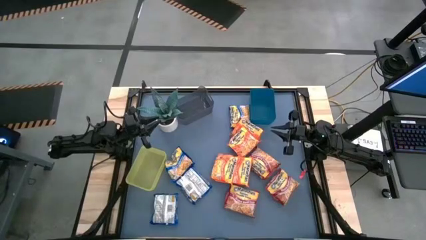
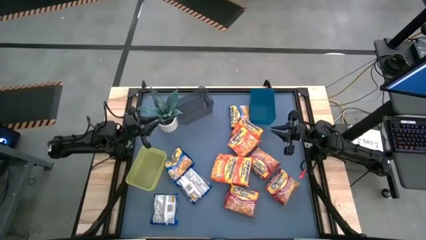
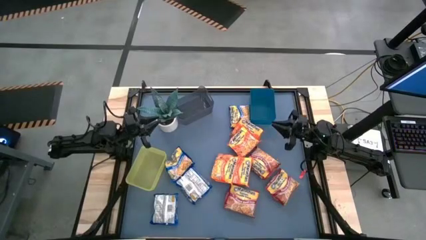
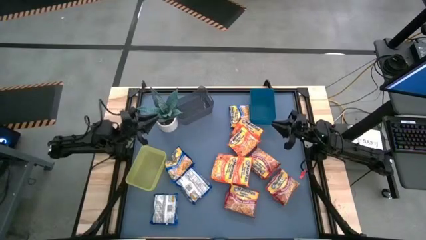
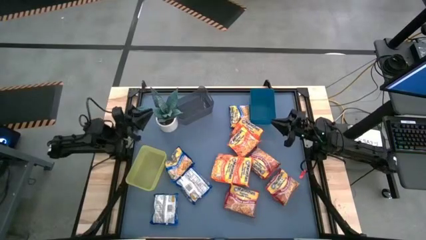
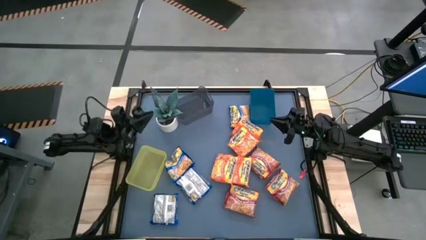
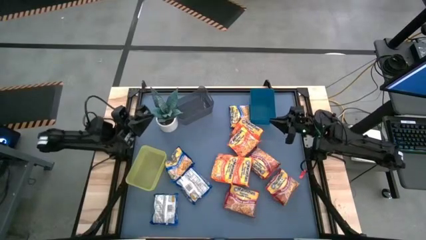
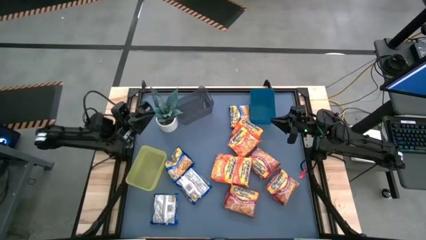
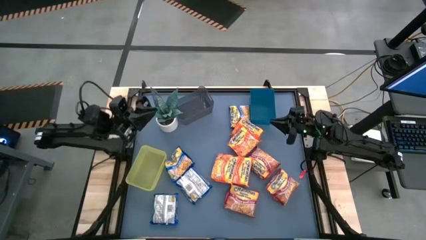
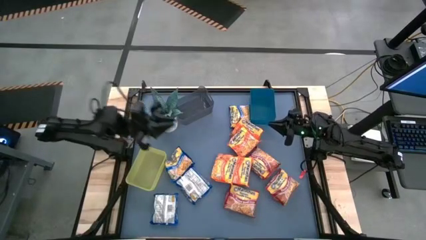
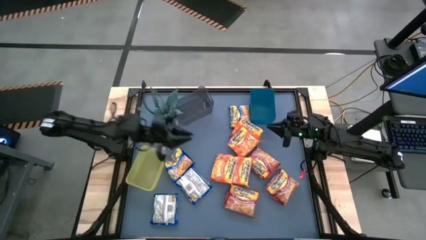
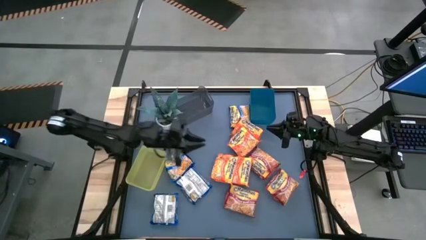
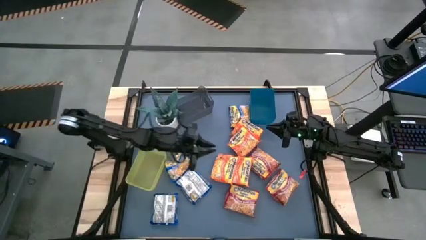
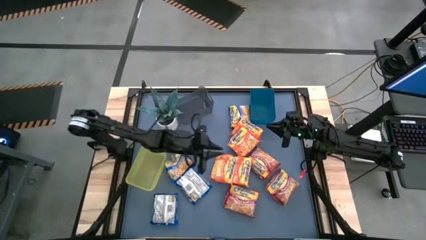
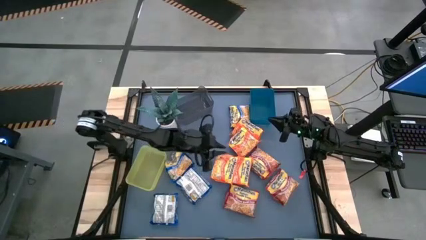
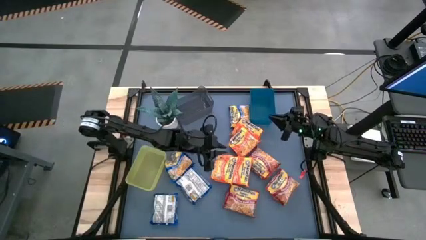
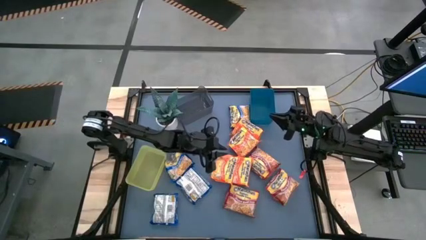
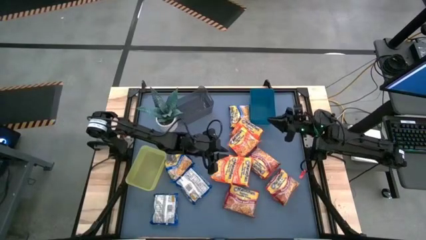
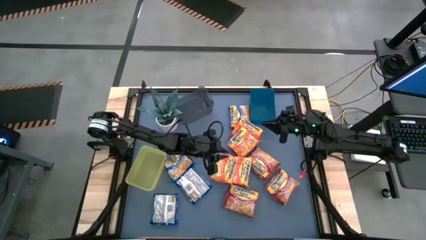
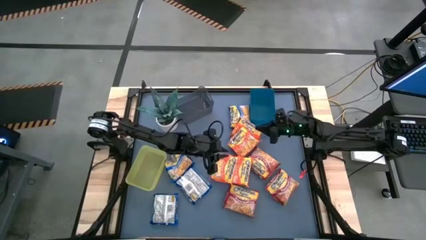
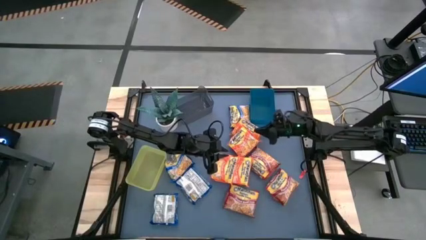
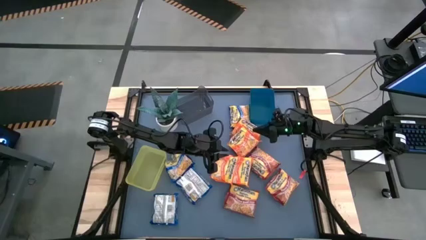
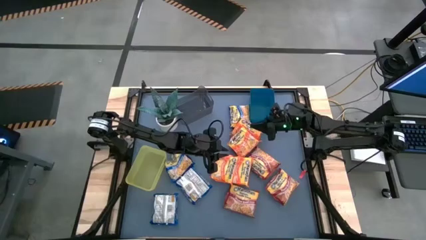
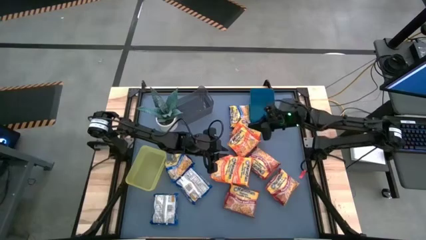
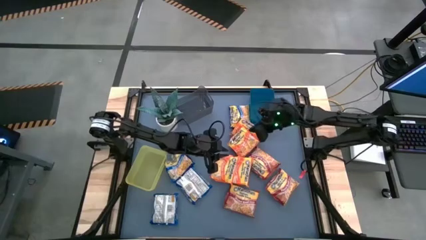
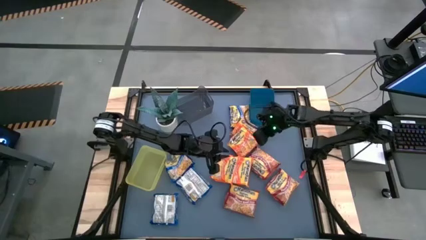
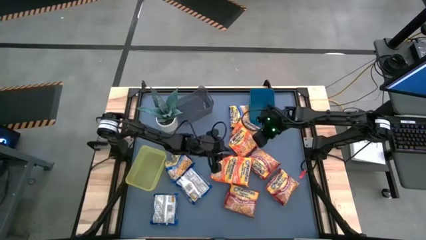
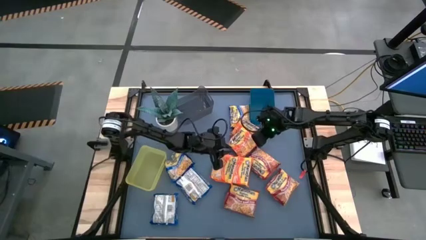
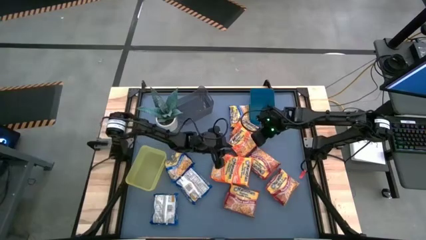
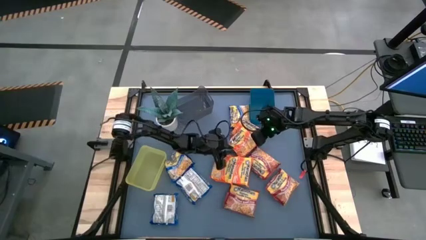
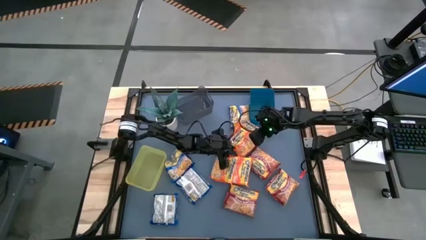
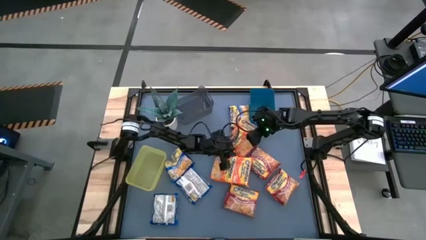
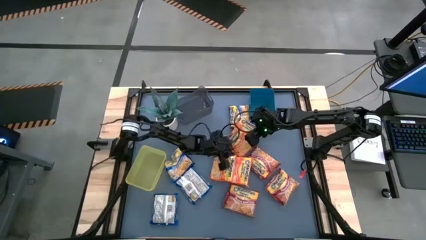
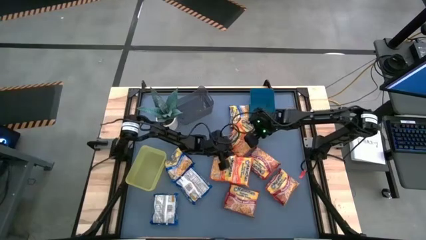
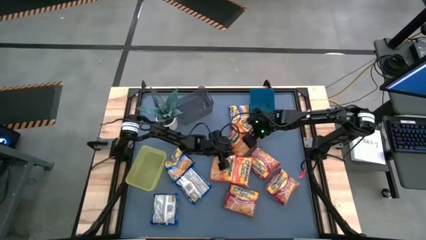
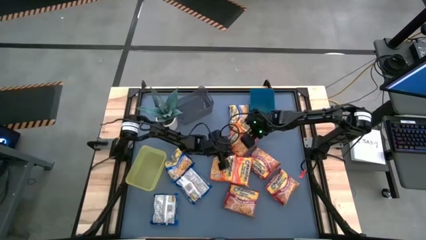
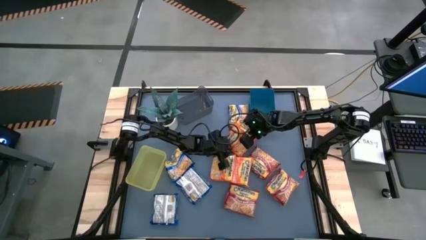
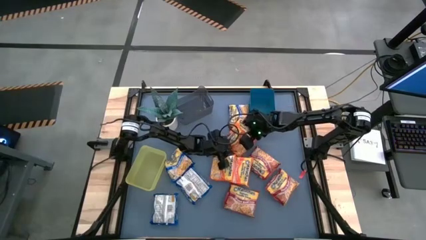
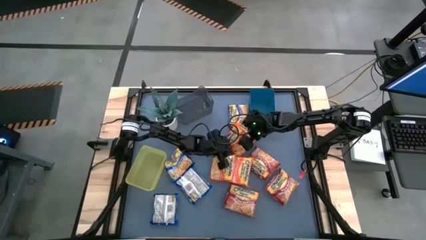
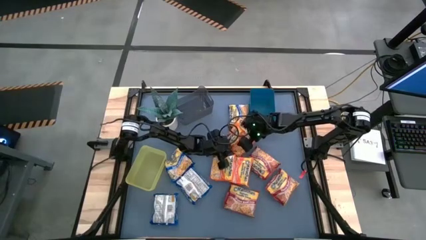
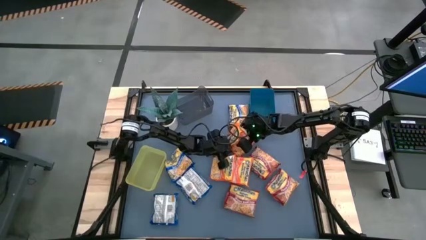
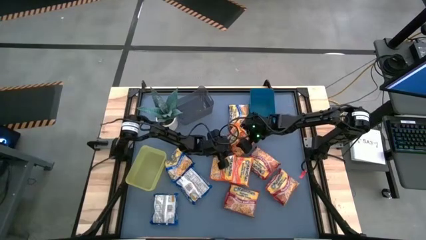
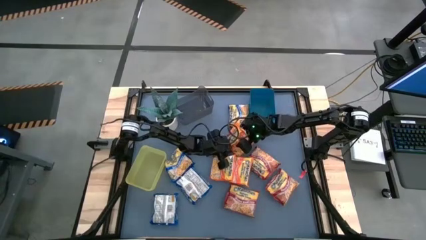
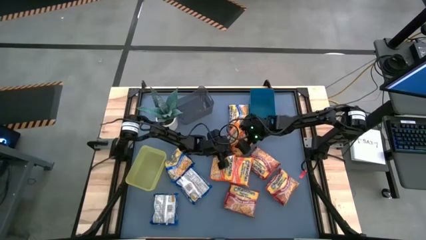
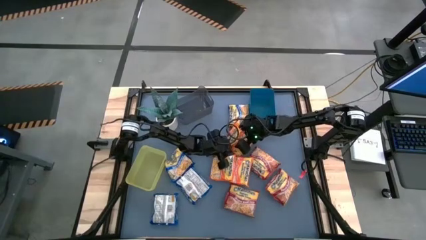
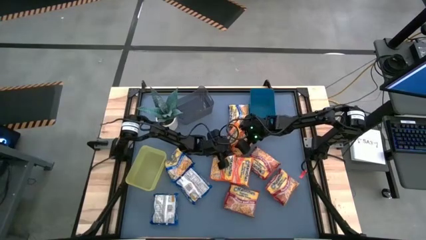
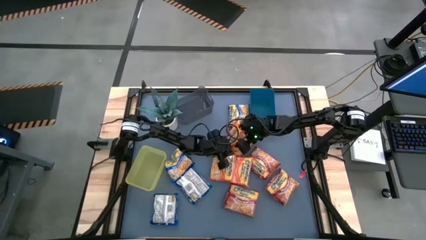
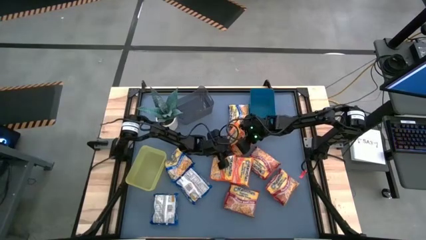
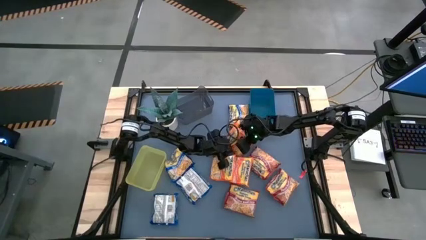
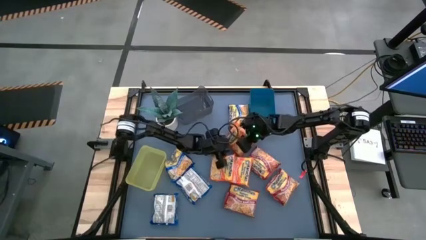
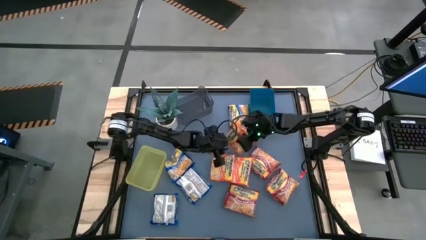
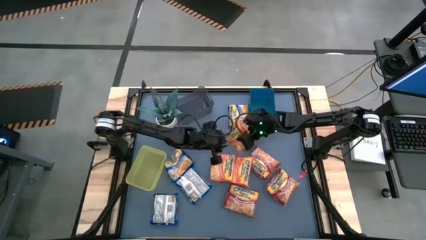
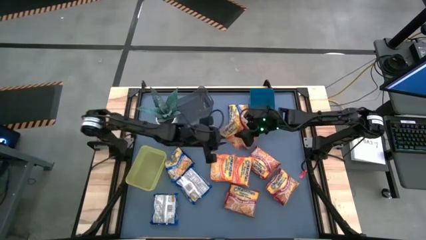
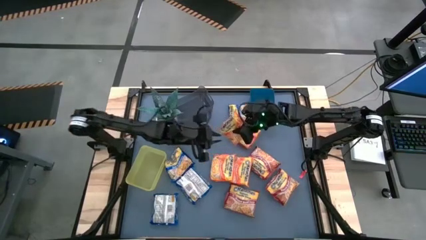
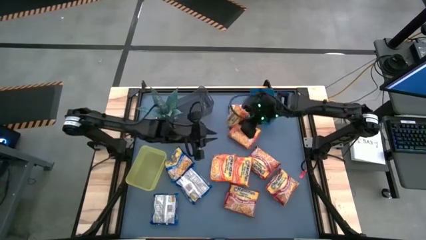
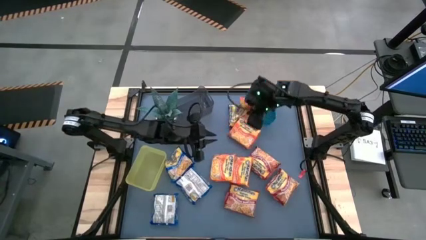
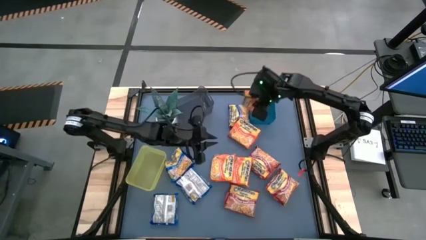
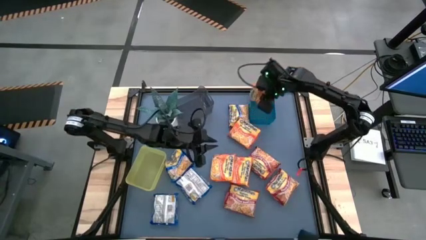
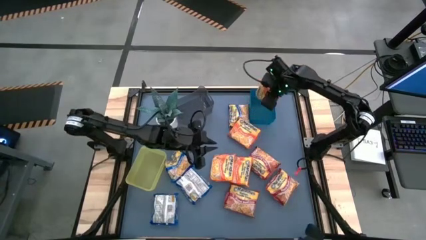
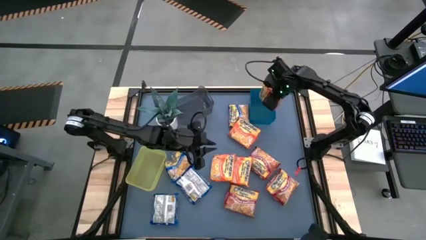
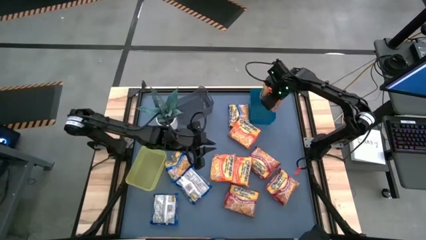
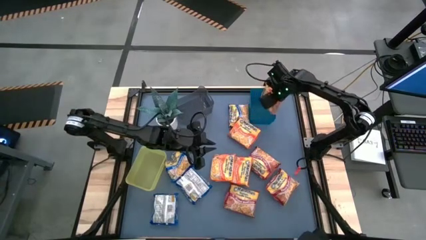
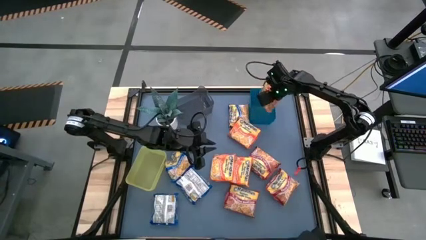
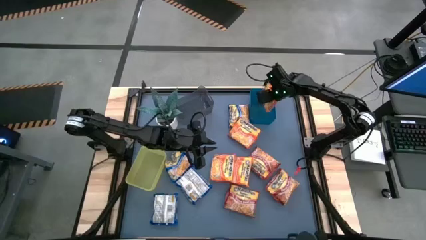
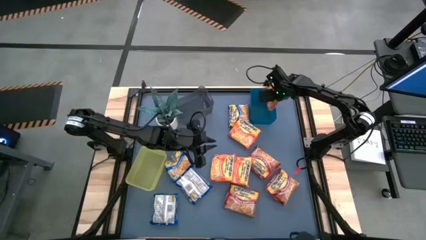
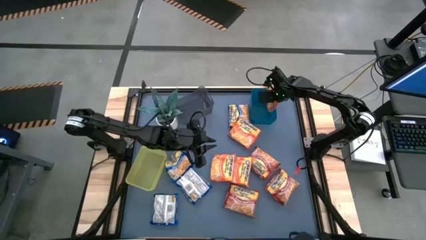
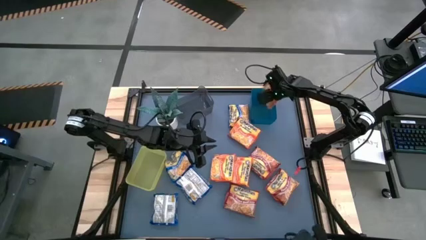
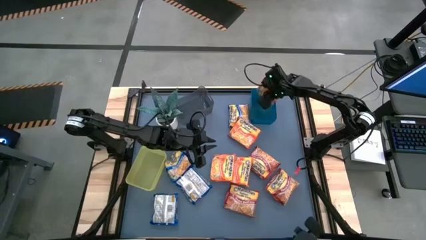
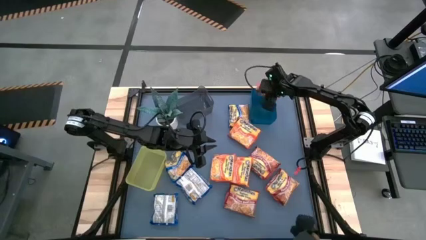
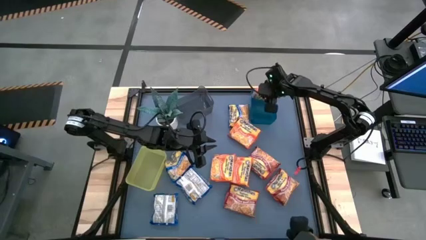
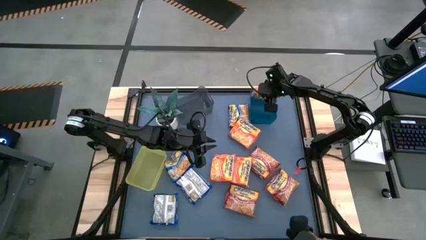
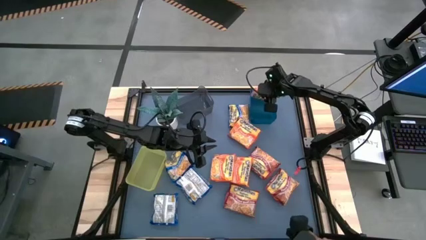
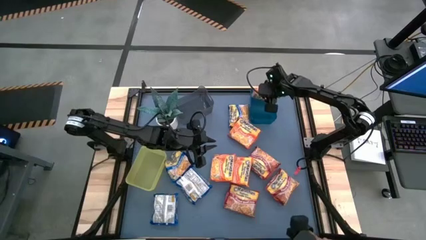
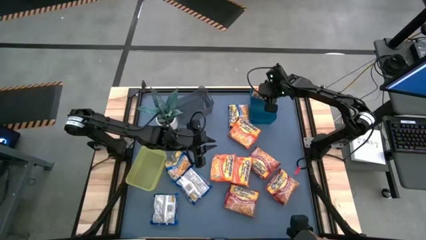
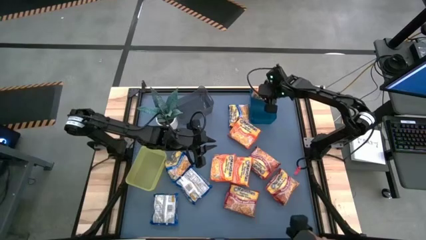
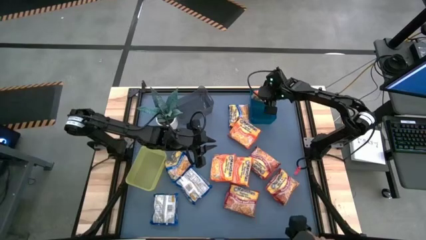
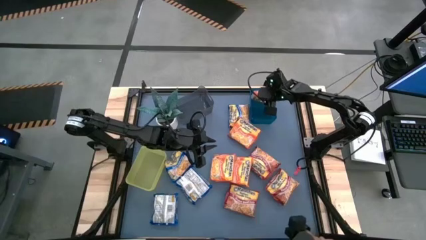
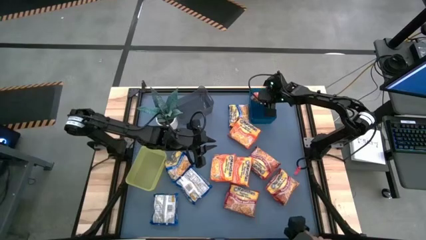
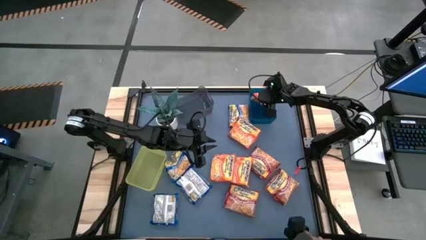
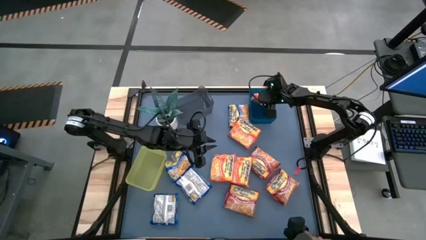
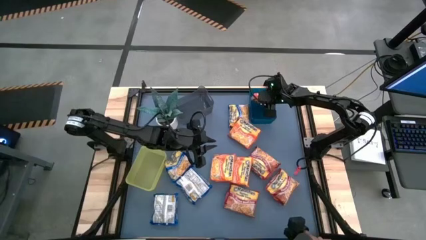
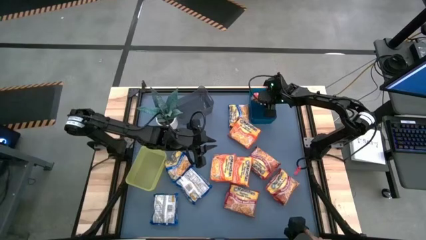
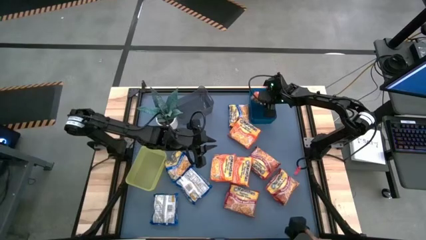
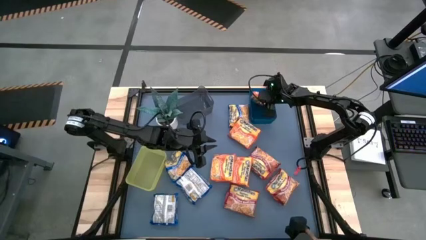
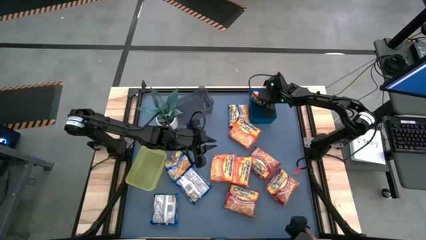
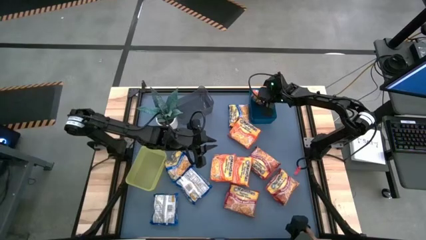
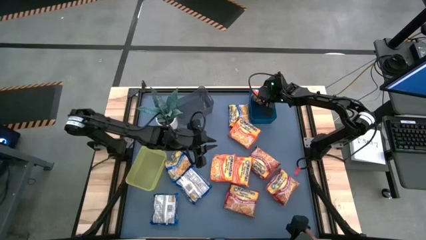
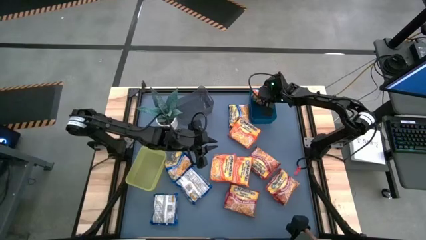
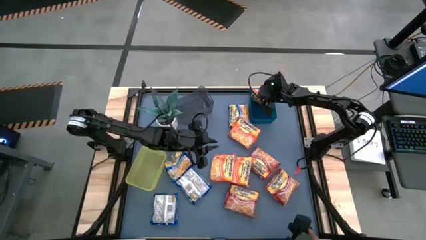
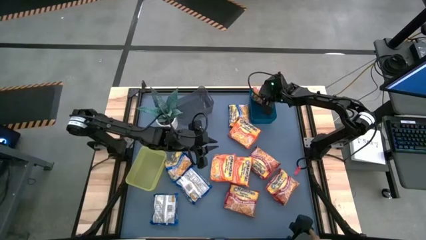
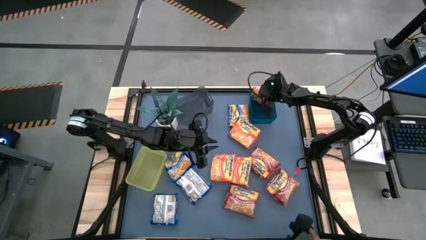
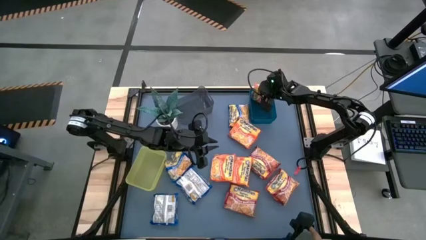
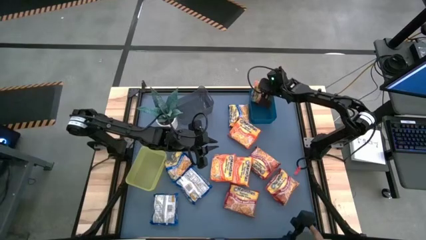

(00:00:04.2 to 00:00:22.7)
Task: Sort Maruchan noodles
Put the orange noodle pack into blue bin
